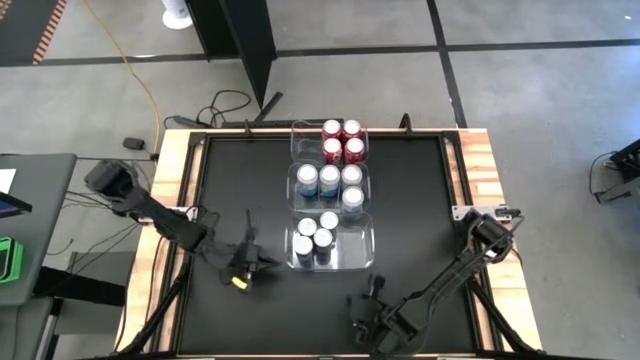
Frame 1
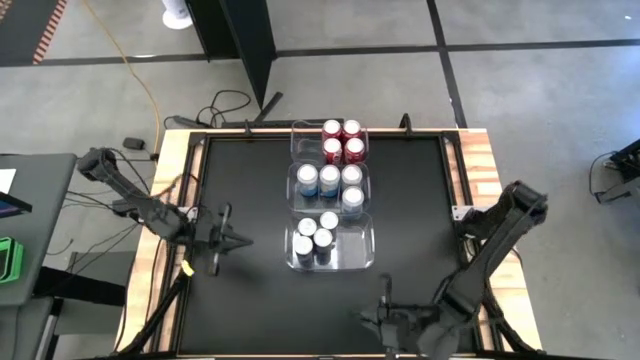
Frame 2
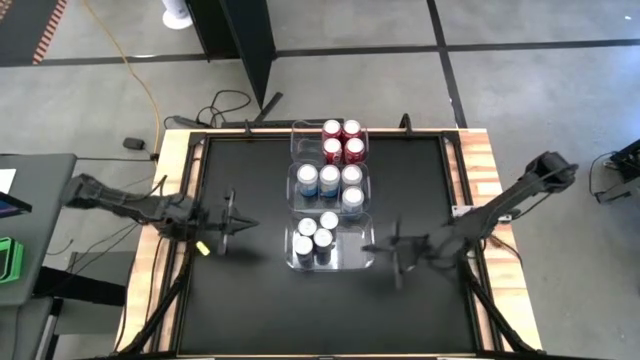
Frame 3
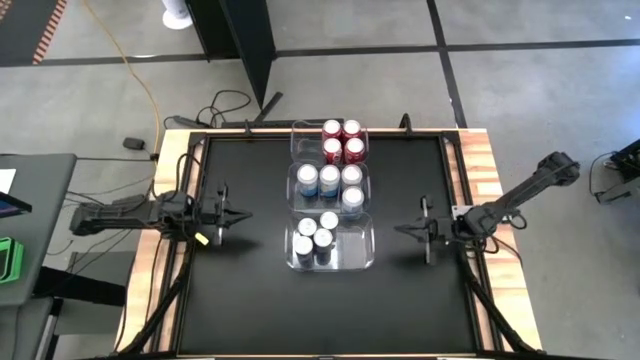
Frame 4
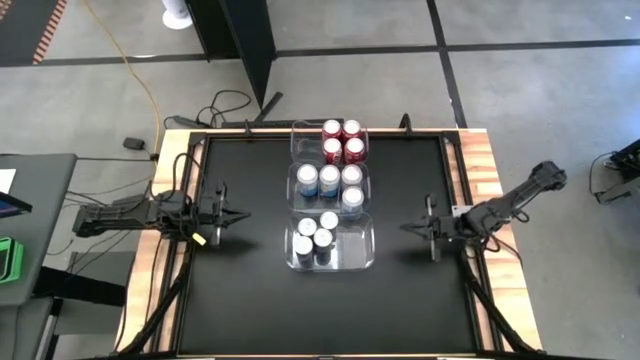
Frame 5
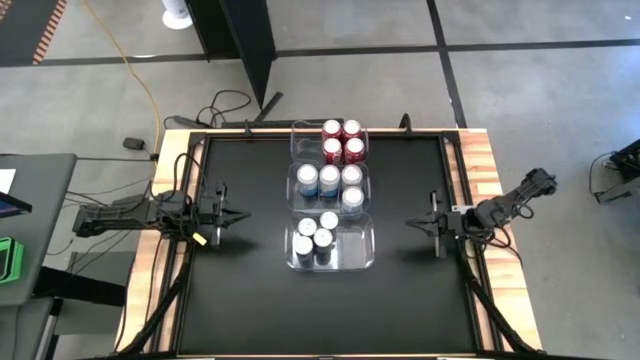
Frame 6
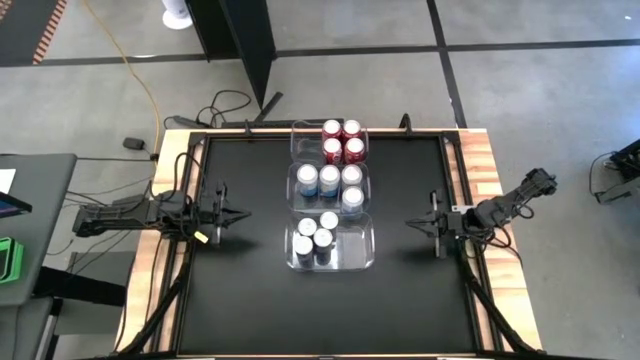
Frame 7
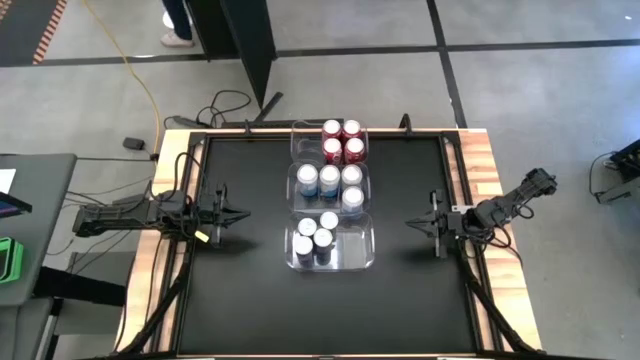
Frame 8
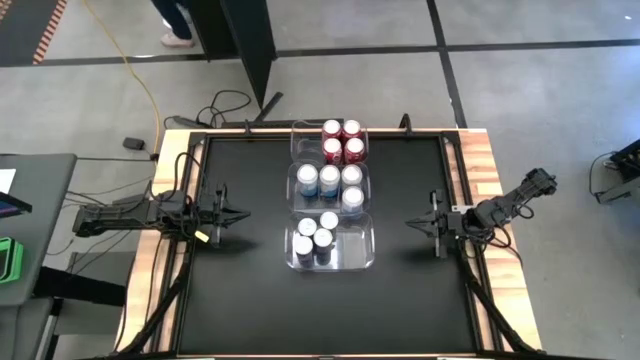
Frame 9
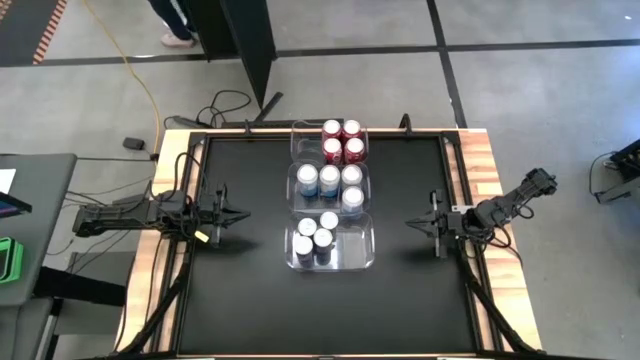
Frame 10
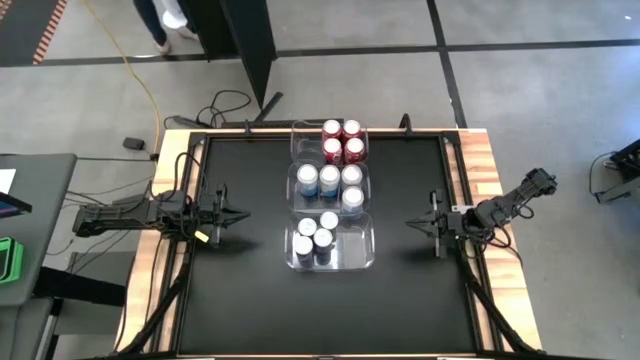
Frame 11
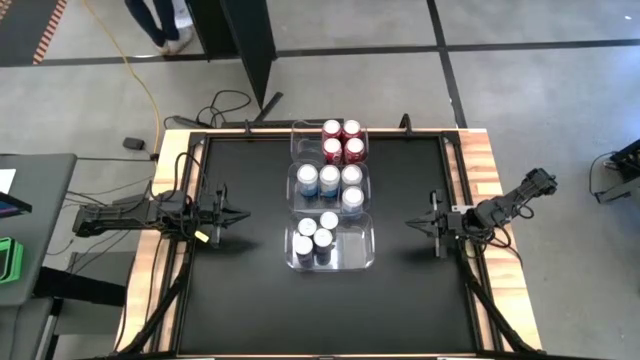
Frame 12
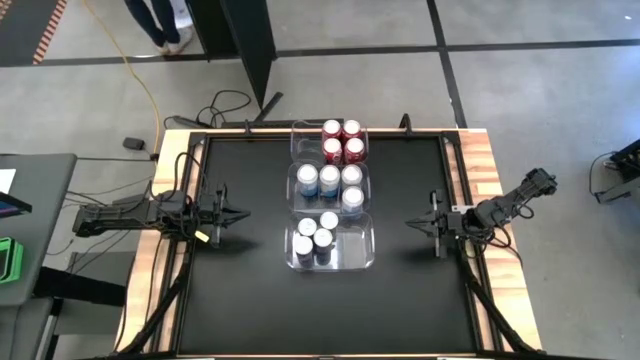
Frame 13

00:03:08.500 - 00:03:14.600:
Task: Sort soda cans
Return to Home Position

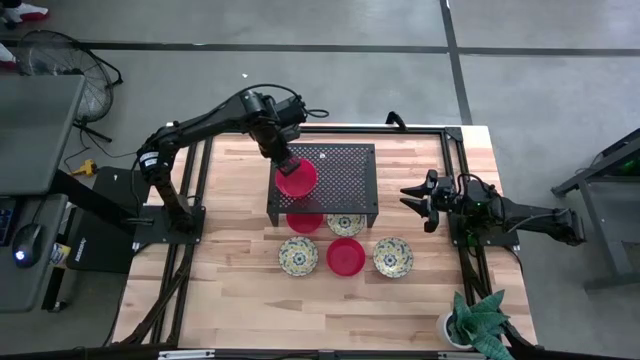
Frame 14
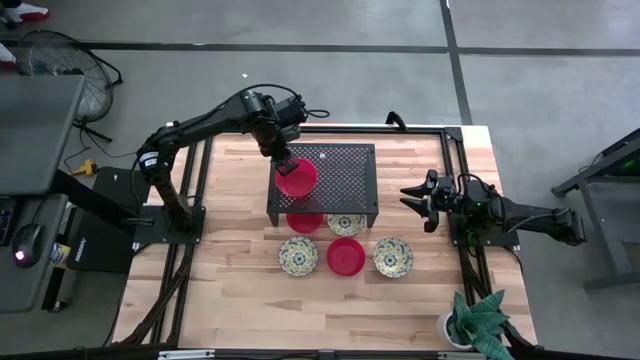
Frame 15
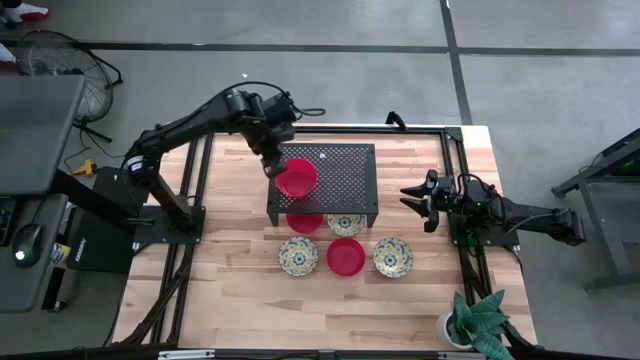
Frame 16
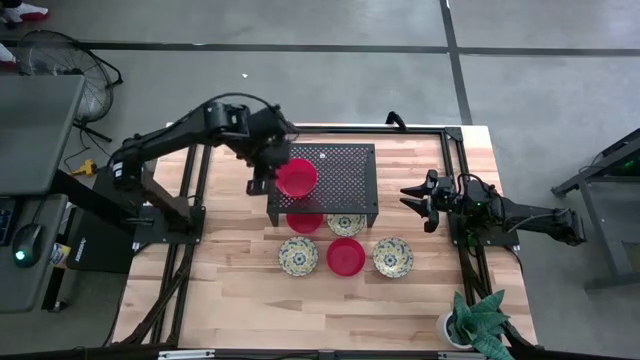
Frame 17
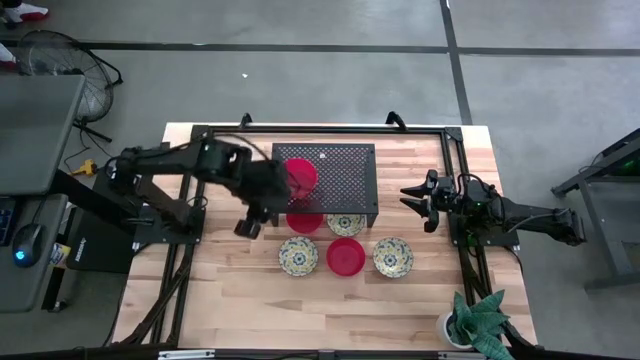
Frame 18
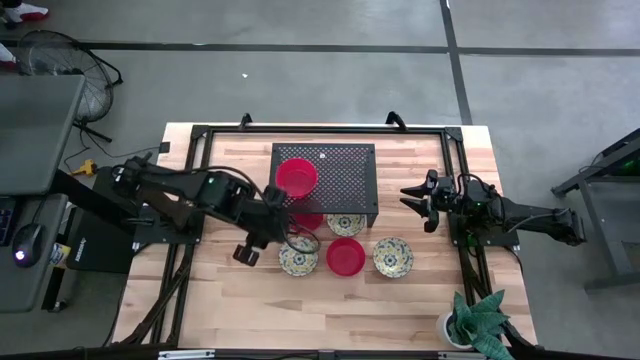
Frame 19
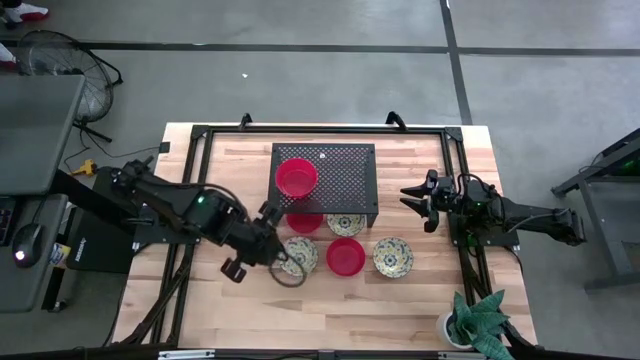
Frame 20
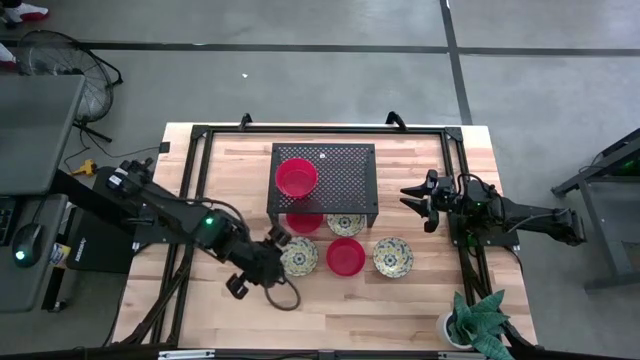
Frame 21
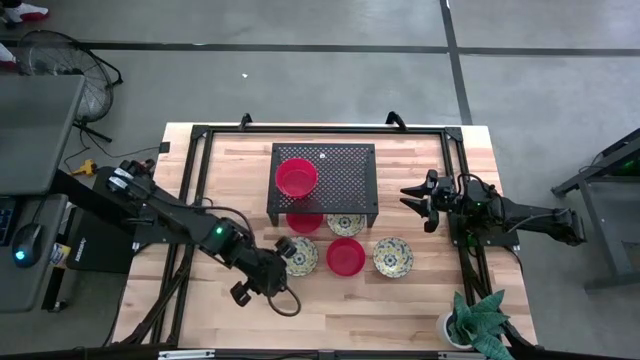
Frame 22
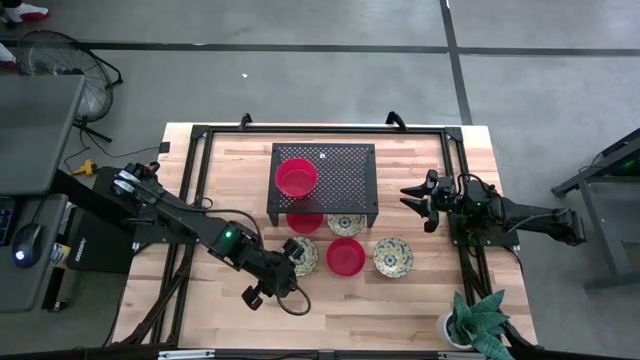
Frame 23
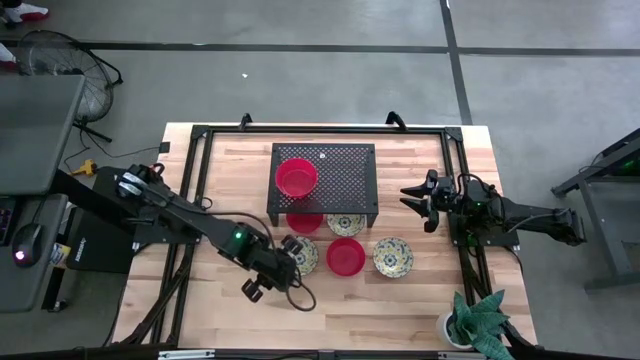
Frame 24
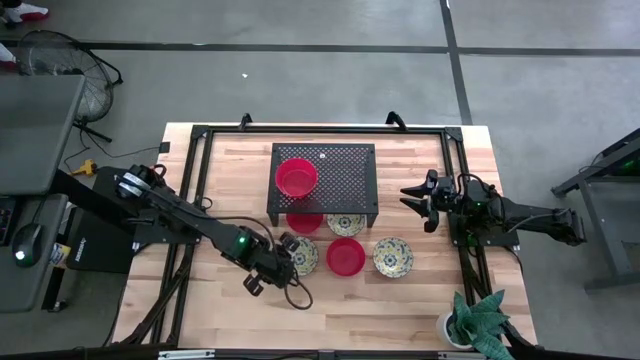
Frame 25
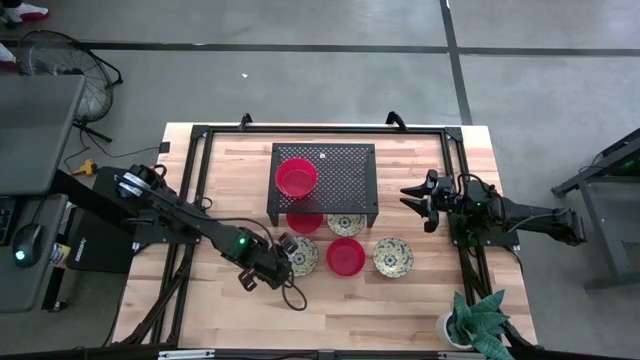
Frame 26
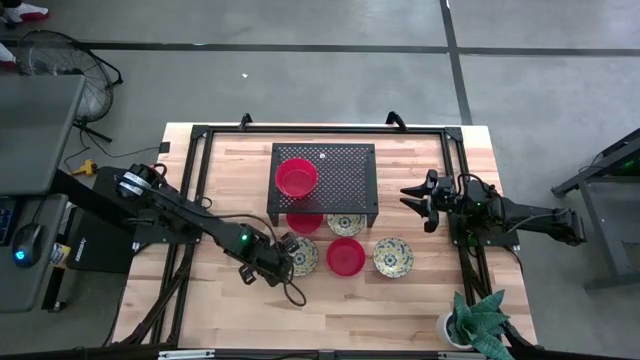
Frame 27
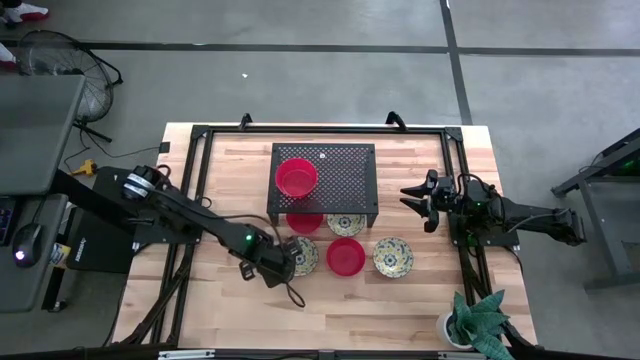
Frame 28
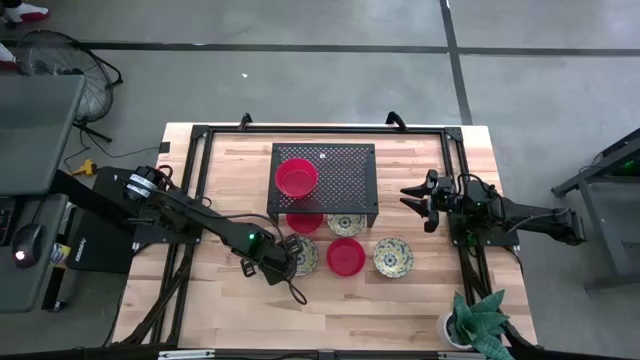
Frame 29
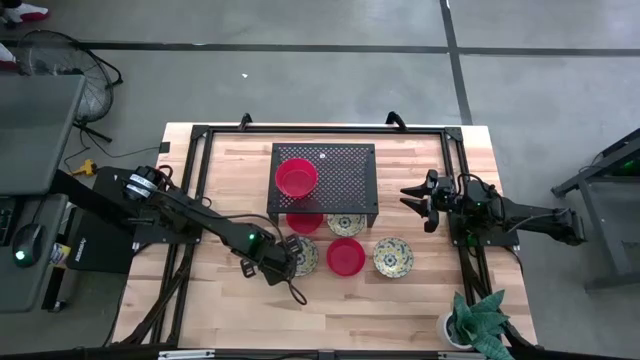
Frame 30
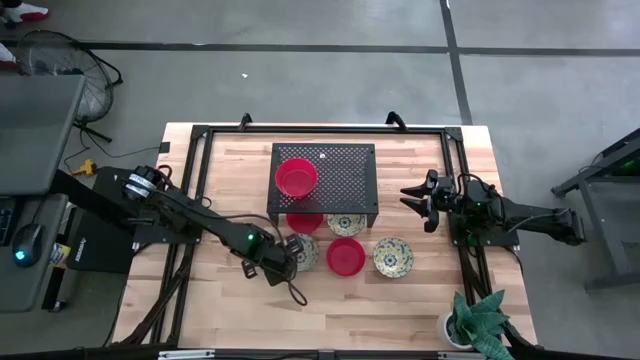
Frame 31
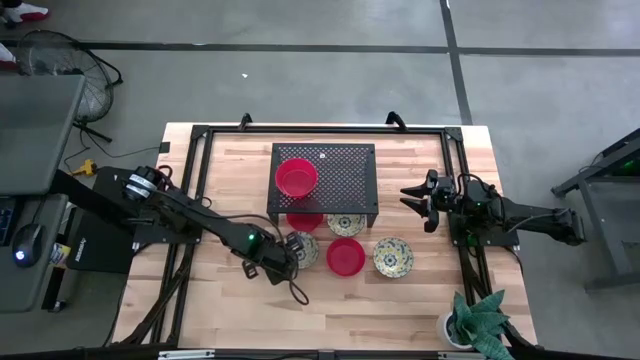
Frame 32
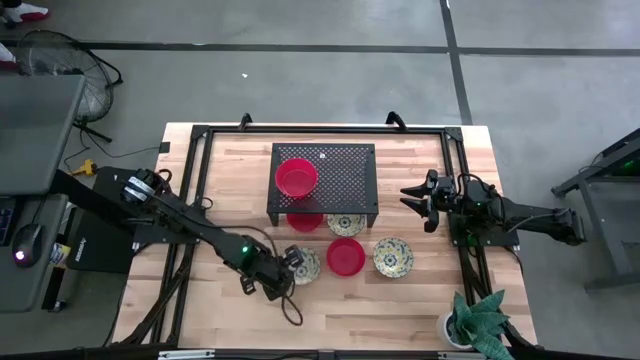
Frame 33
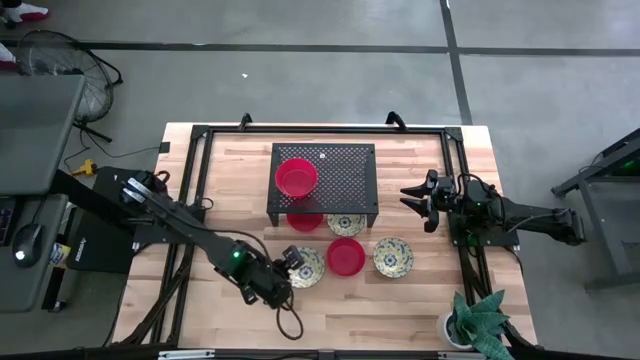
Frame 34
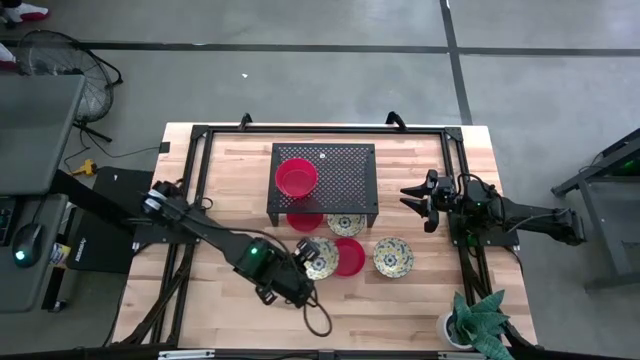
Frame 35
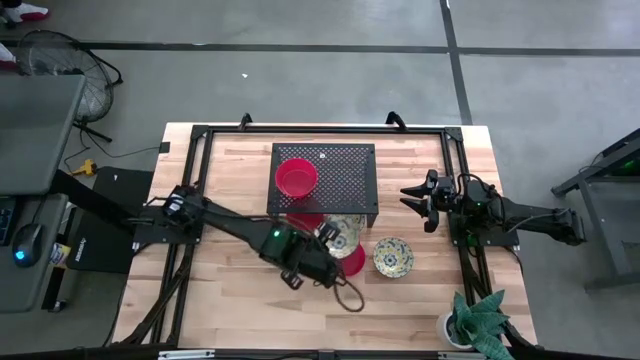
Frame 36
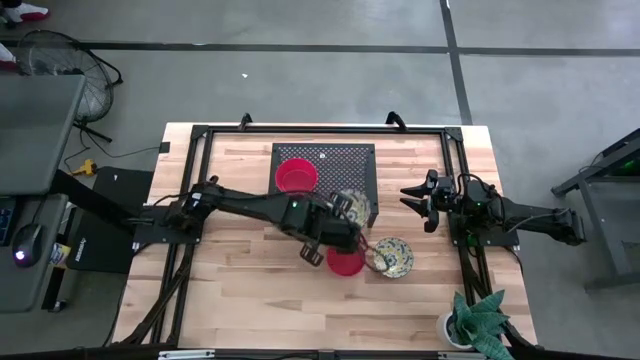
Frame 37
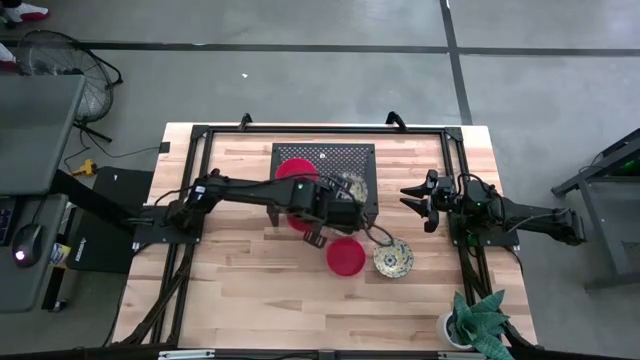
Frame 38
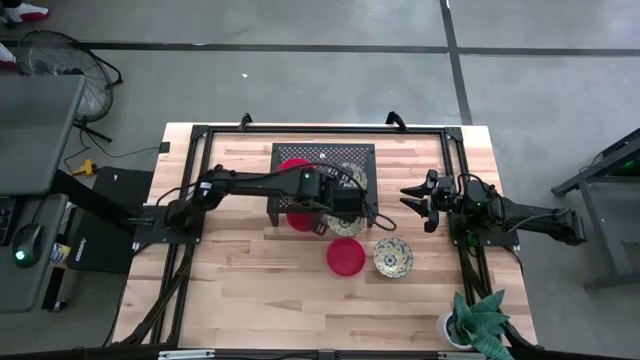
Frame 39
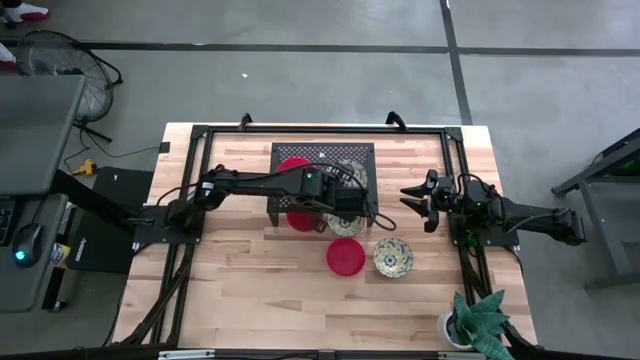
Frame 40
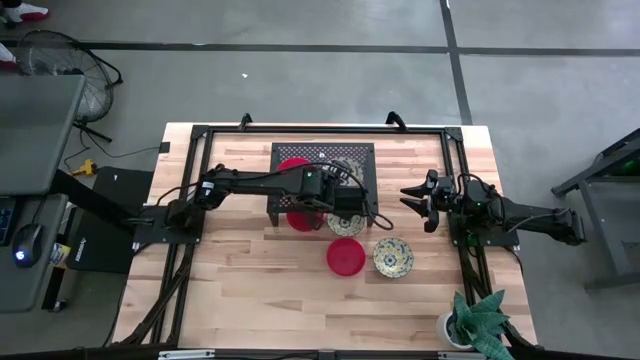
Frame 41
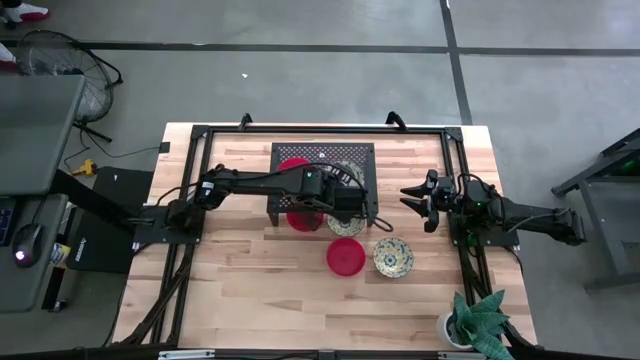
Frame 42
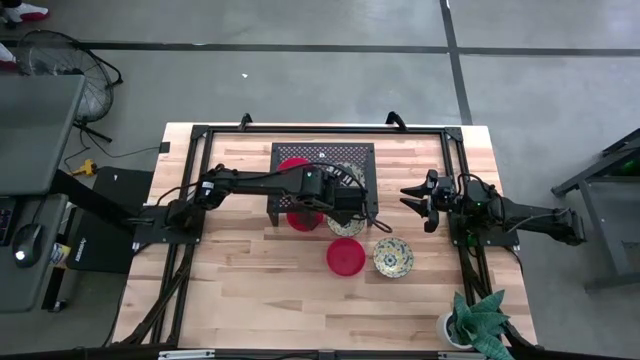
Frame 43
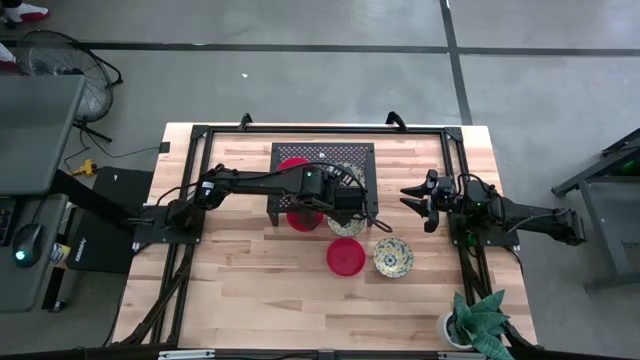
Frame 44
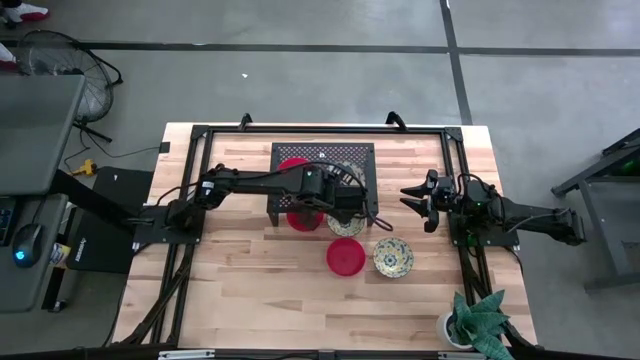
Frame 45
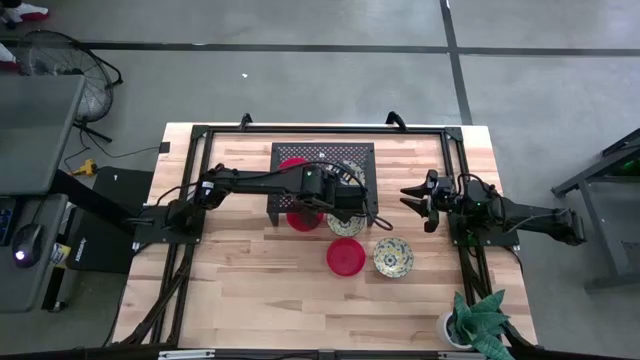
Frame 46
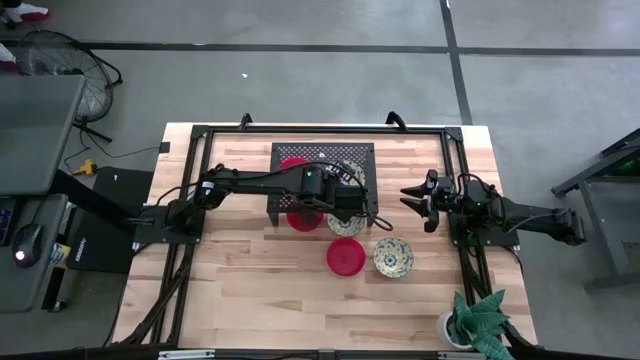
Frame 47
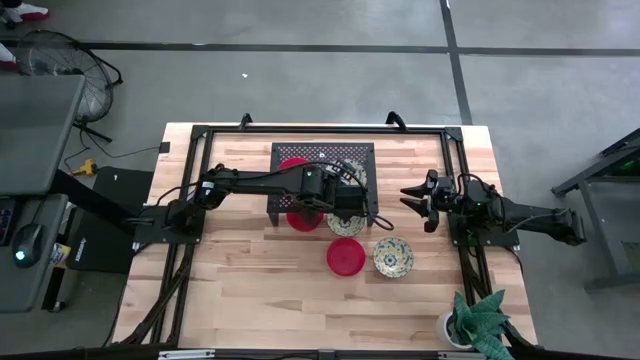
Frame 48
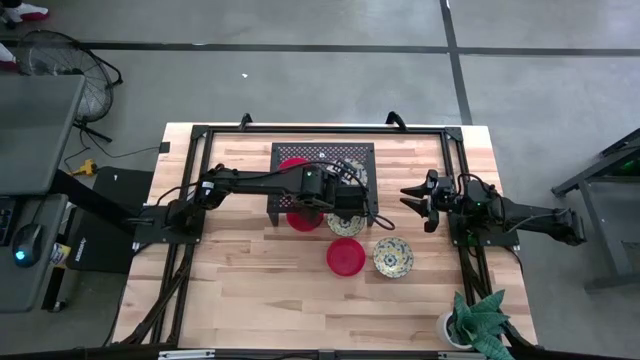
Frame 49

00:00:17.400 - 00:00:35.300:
Task: Pick & Place Mini bowls
Put the bottom left white patterned bowl on the shelf
